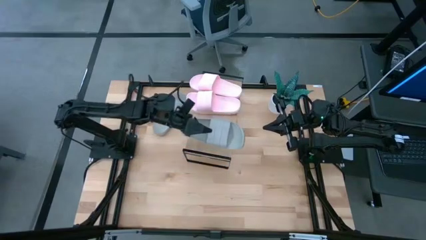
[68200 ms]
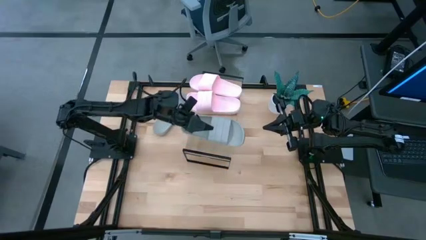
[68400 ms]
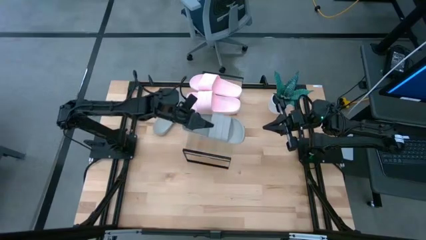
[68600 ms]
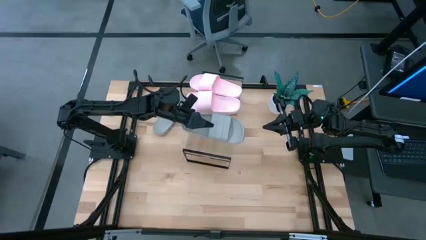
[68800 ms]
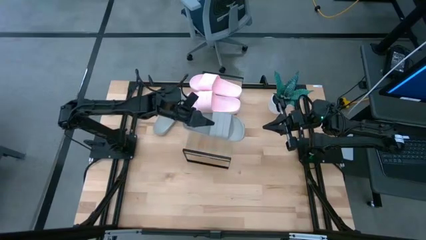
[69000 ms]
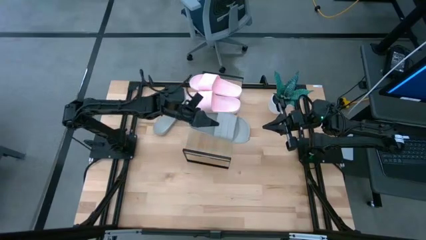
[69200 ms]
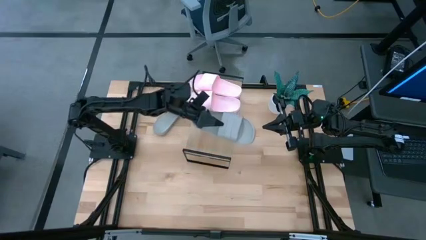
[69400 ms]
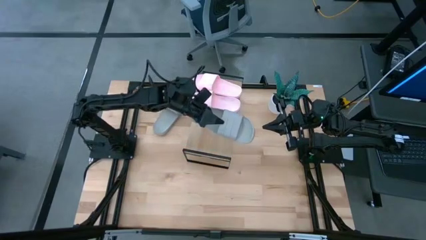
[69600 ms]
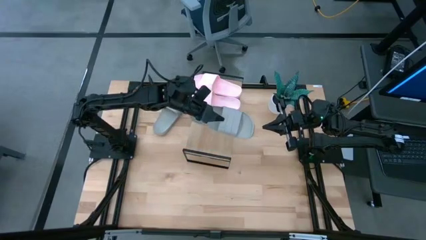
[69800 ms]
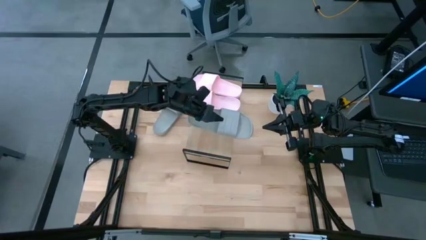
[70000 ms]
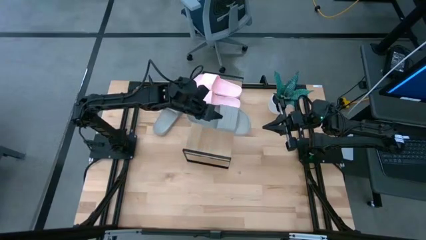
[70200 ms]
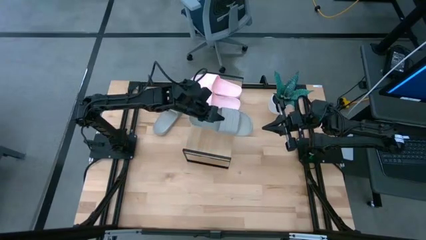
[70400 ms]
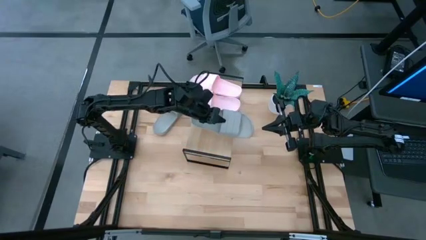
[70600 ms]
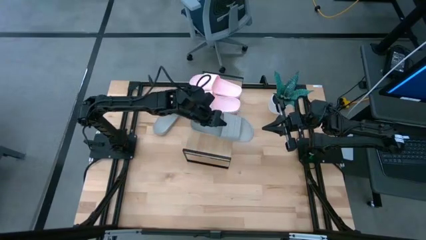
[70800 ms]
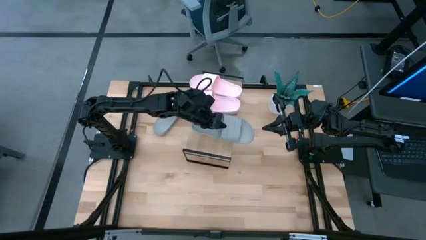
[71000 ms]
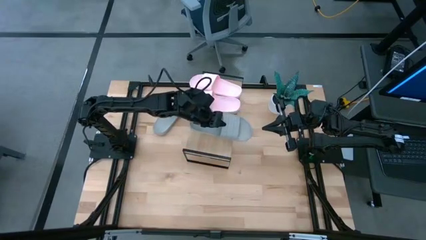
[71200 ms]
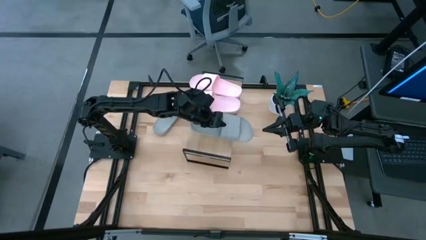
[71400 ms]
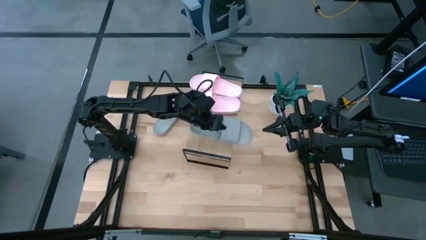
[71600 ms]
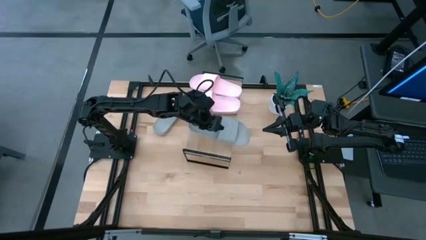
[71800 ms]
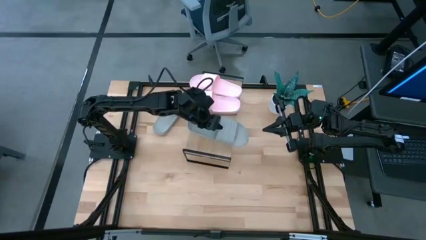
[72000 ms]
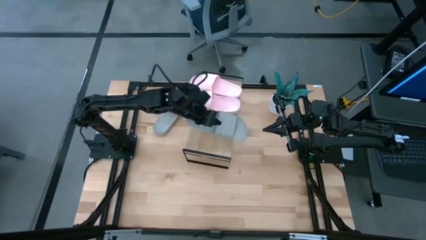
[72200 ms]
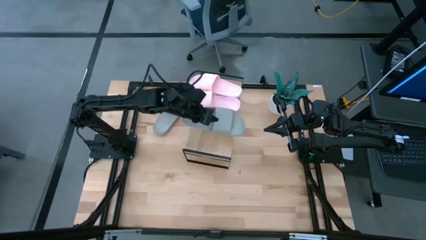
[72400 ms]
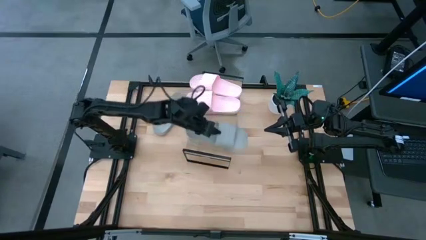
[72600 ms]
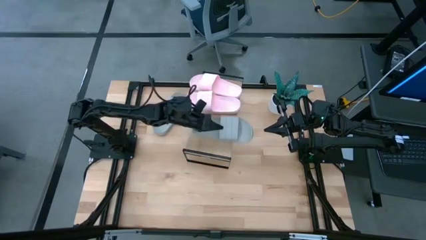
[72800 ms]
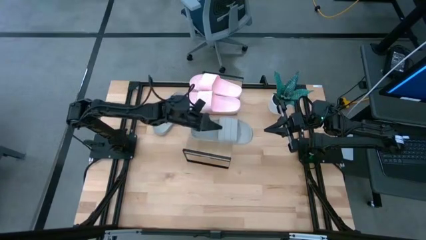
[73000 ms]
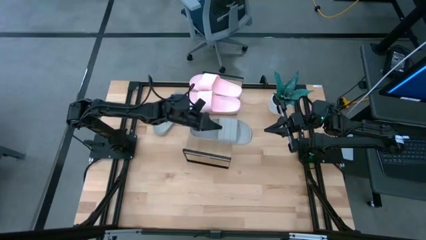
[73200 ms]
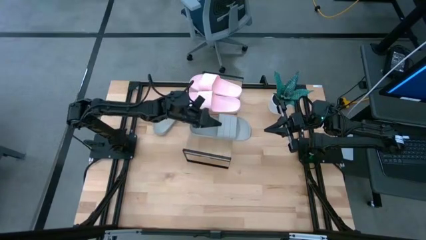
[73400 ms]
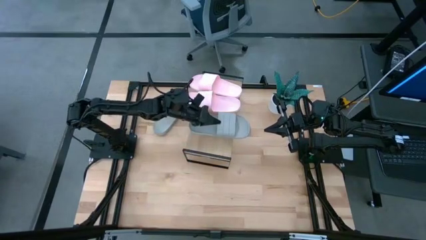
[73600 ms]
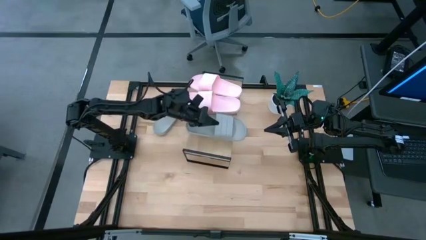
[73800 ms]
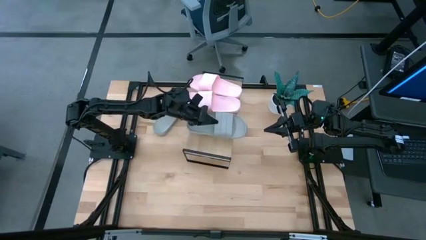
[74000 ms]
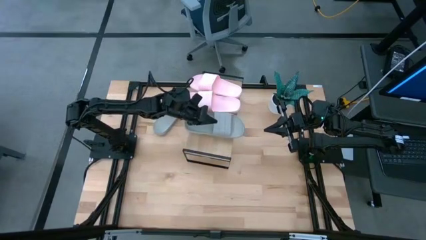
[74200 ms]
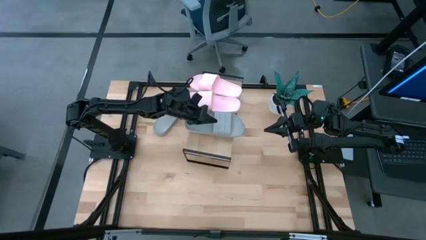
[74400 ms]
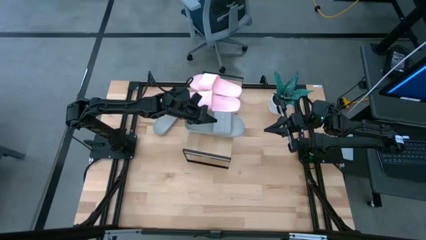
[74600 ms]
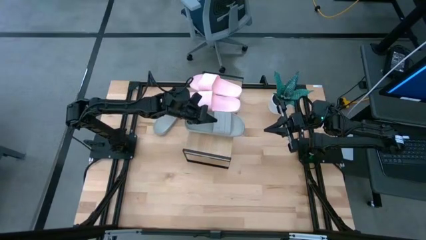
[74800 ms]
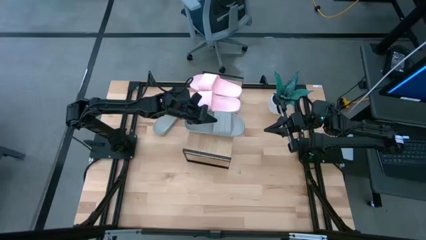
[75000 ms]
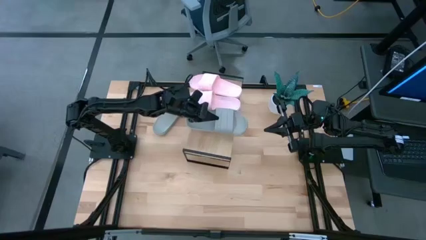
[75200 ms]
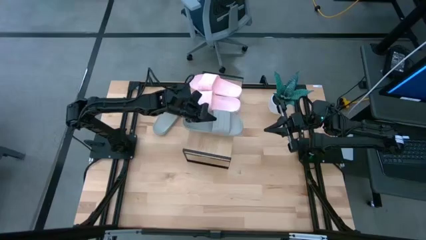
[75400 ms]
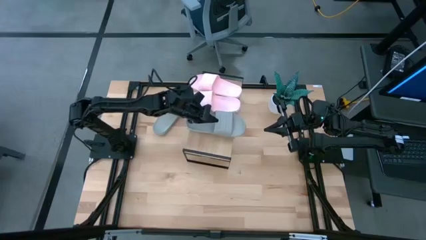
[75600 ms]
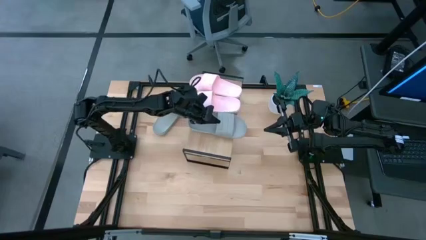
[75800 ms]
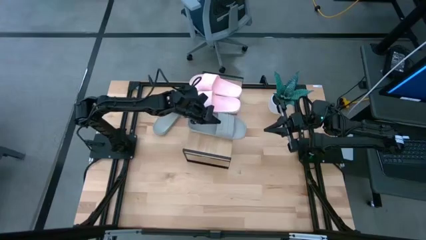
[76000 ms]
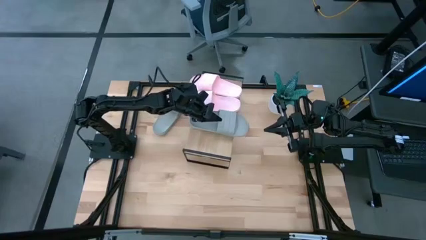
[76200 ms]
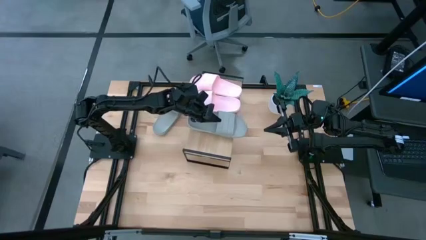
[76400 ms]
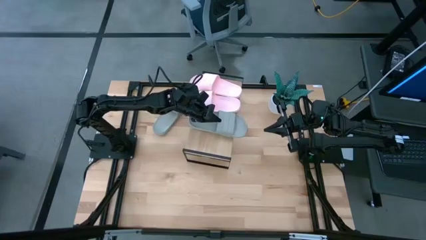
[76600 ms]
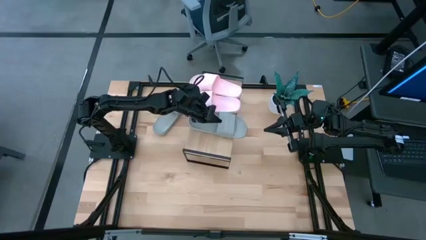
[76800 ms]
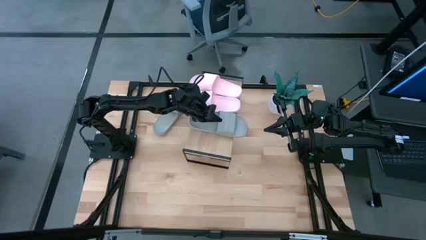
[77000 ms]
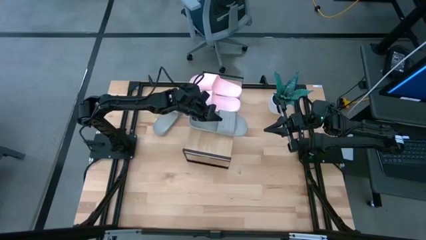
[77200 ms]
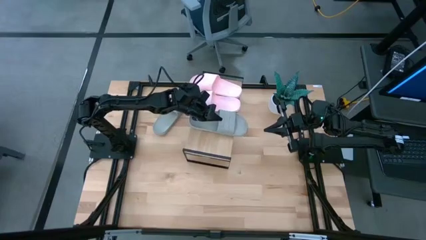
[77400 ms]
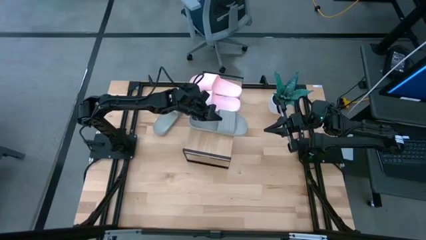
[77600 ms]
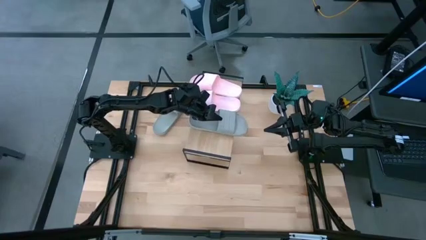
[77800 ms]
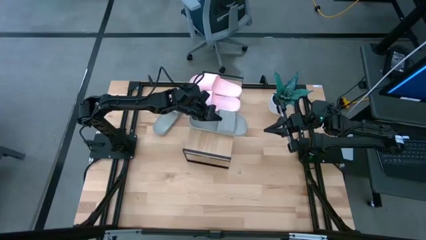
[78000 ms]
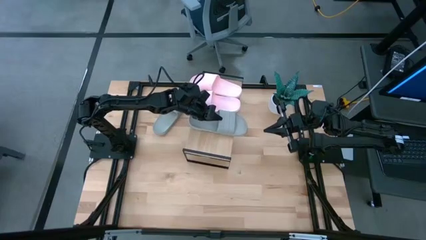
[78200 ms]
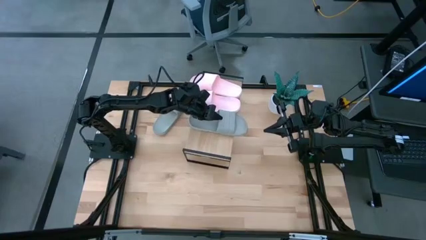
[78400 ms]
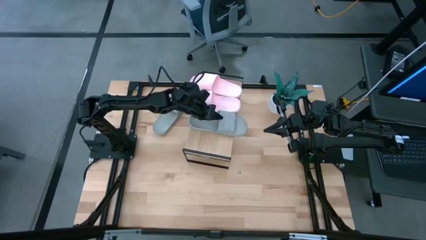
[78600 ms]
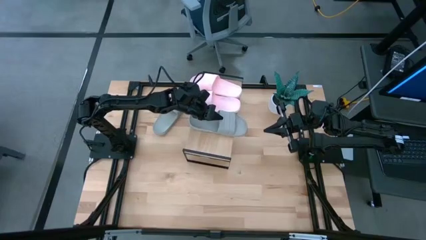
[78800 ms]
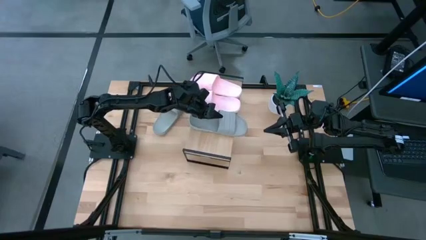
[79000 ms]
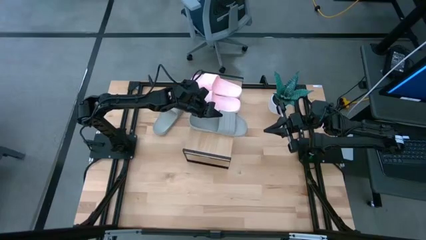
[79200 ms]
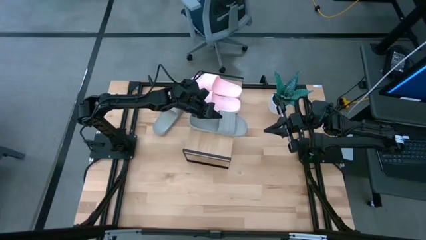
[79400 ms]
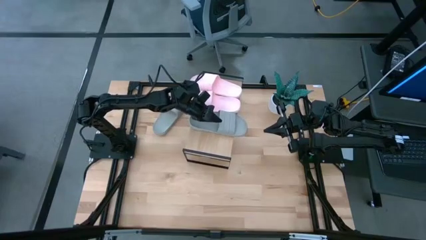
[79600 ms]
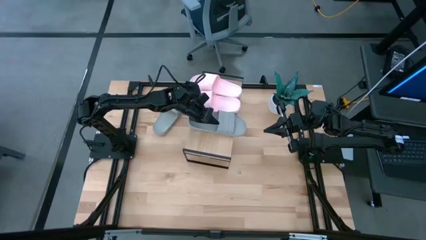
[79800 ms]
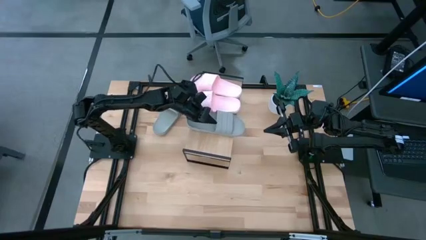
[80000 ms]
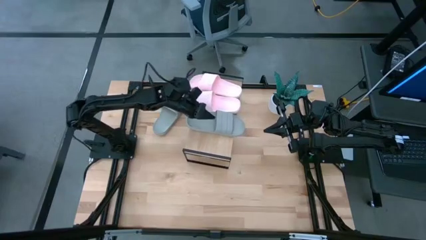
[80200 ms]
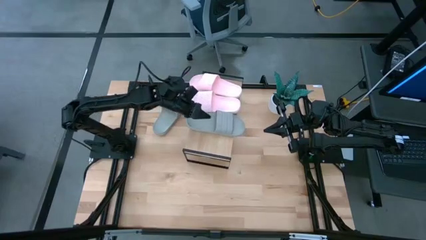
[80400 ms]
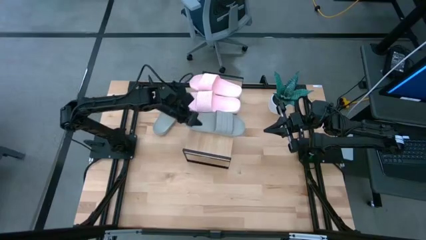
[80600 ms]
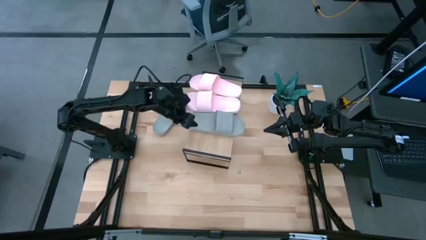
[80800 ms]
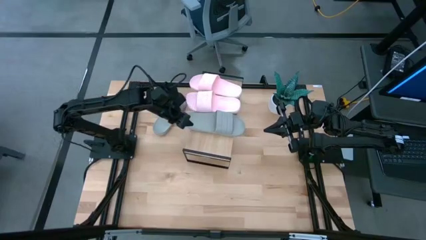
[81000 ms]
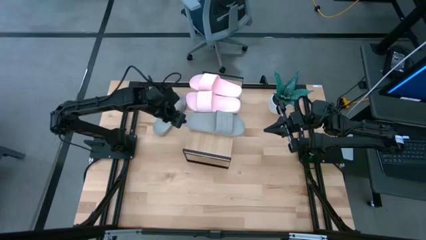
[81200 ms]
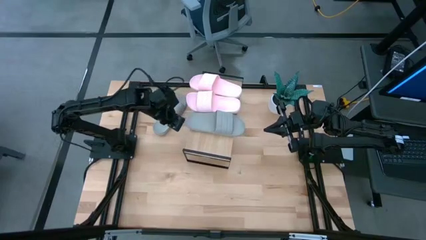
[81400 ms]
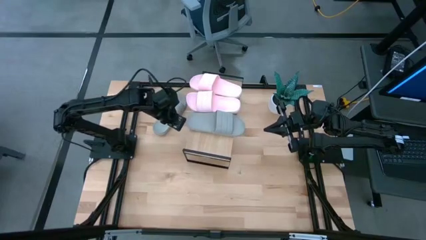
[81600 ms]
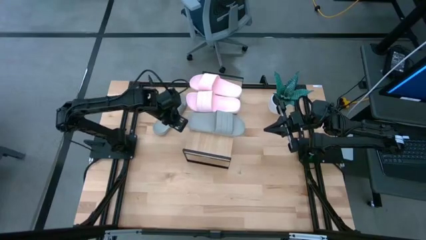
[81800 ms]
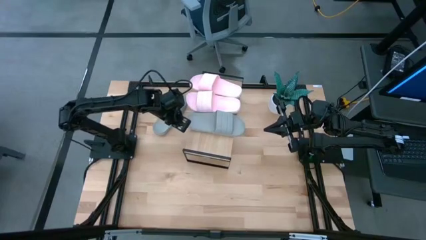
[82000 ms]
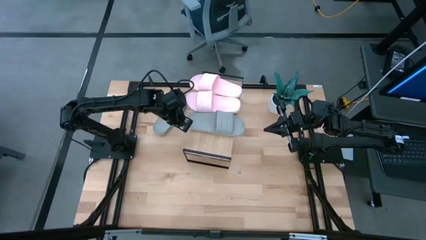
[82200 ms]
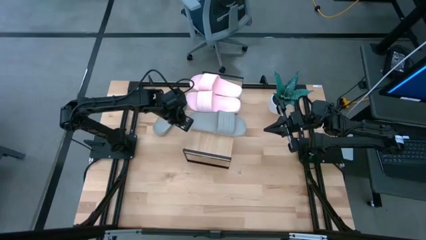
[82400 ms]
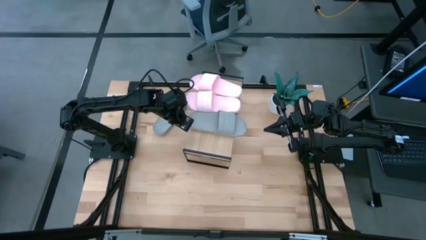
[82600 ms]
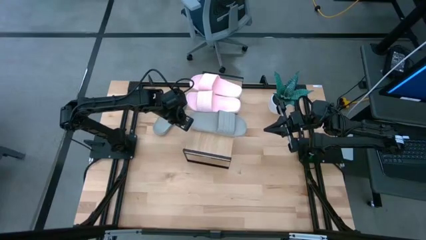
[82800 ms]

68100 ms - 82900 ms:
Task: Pick and place slides into the shelf
Put the left gray slipper on the shelf
